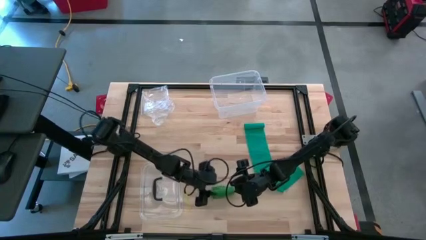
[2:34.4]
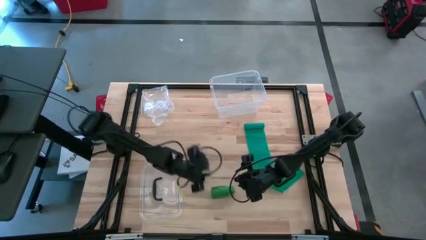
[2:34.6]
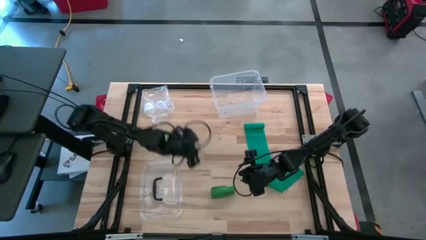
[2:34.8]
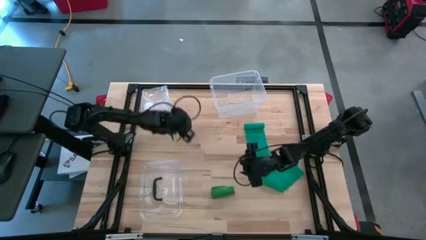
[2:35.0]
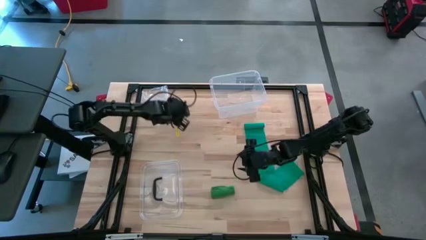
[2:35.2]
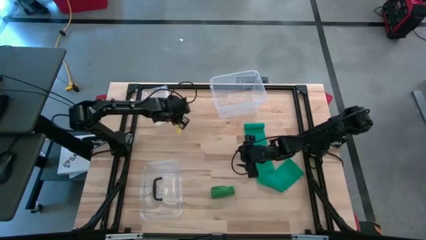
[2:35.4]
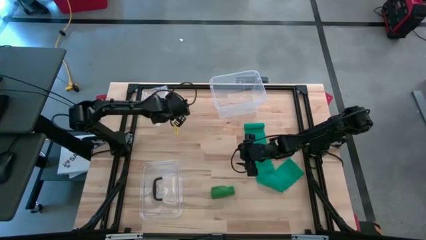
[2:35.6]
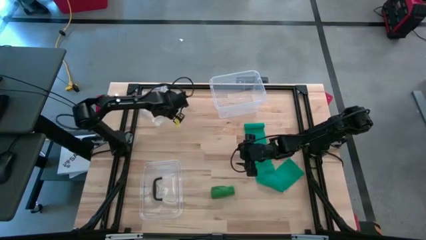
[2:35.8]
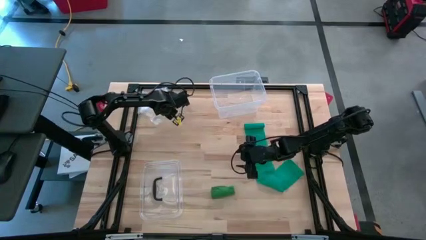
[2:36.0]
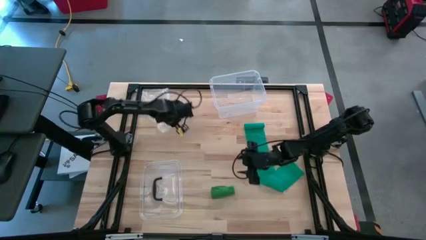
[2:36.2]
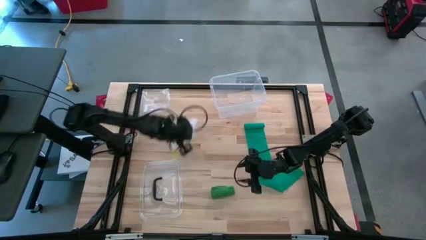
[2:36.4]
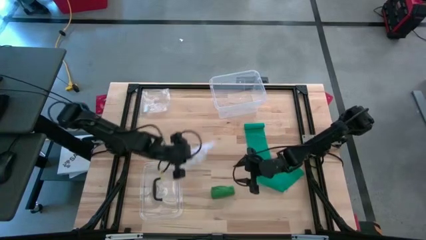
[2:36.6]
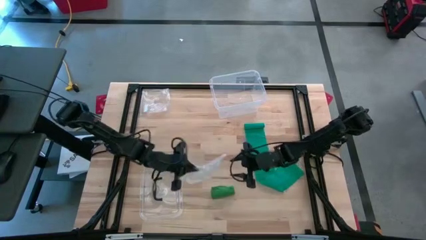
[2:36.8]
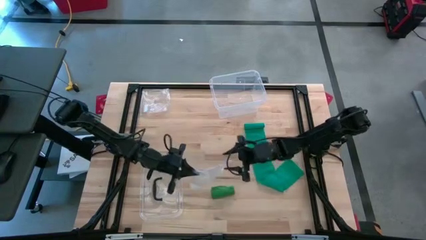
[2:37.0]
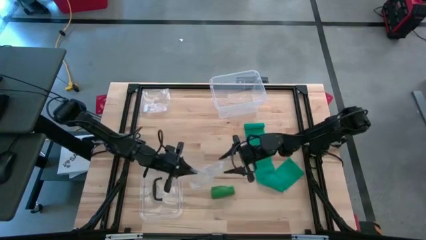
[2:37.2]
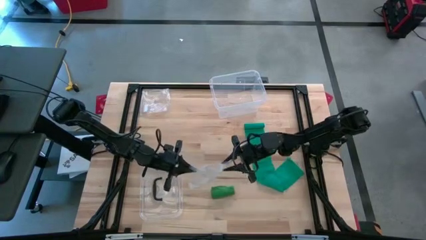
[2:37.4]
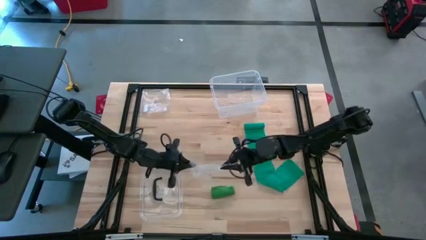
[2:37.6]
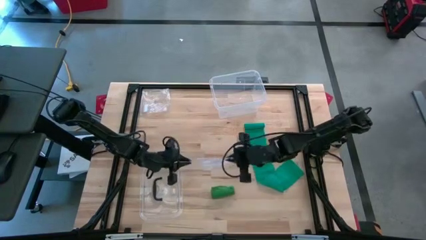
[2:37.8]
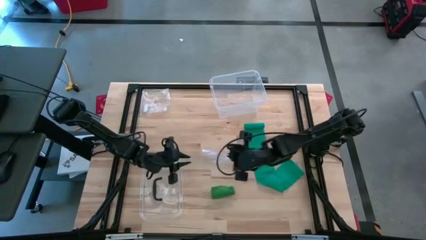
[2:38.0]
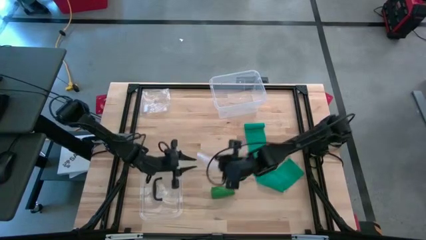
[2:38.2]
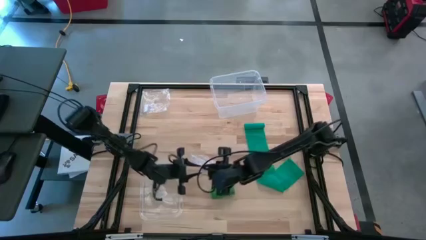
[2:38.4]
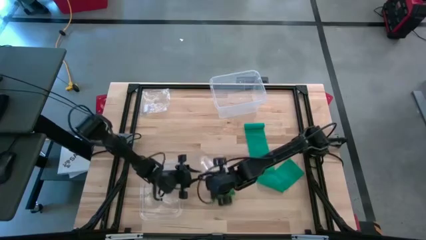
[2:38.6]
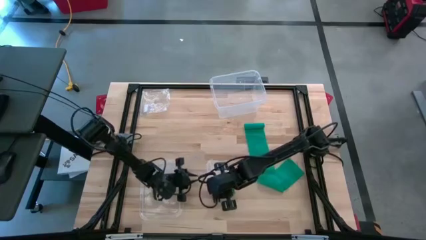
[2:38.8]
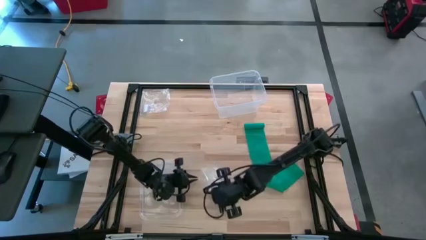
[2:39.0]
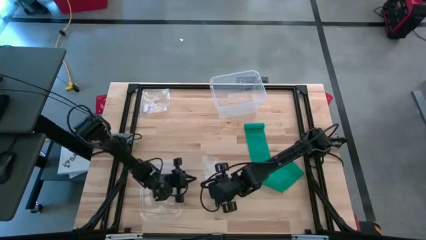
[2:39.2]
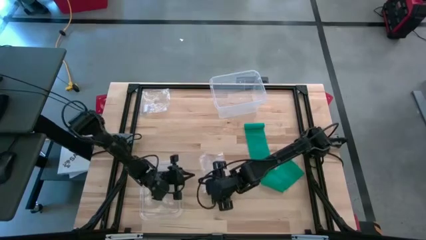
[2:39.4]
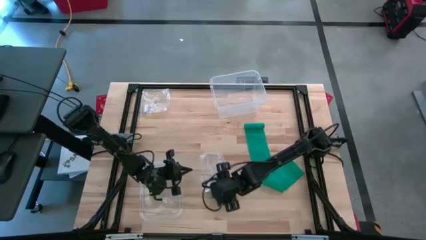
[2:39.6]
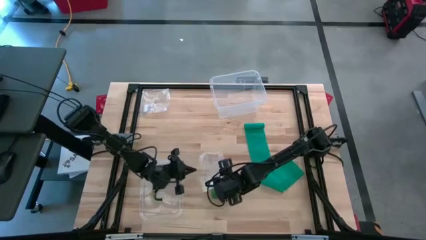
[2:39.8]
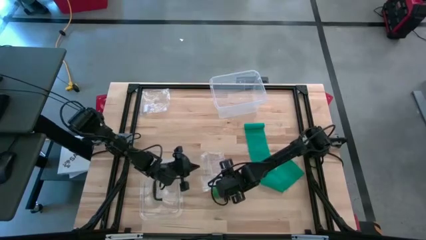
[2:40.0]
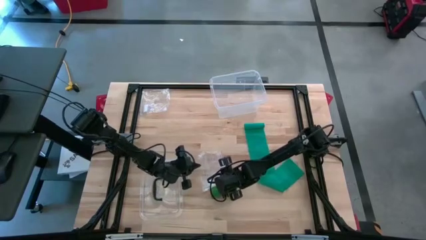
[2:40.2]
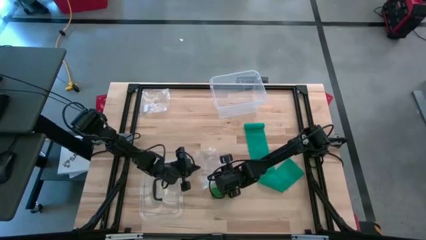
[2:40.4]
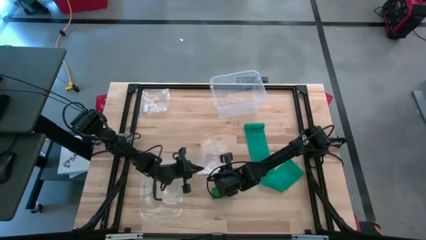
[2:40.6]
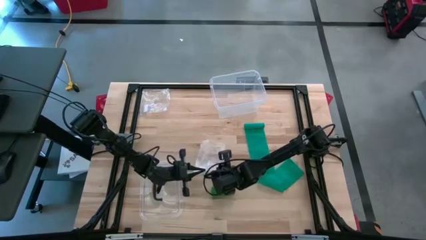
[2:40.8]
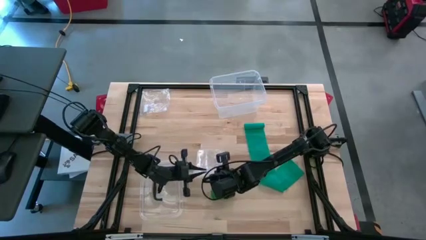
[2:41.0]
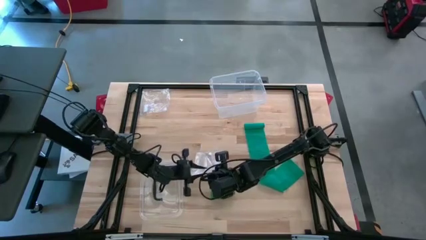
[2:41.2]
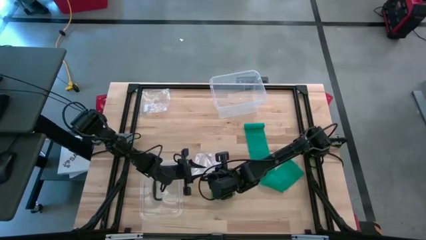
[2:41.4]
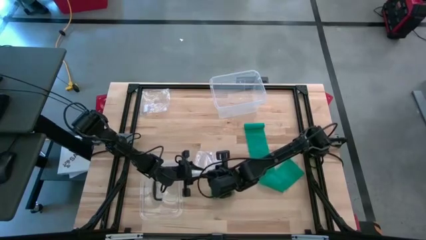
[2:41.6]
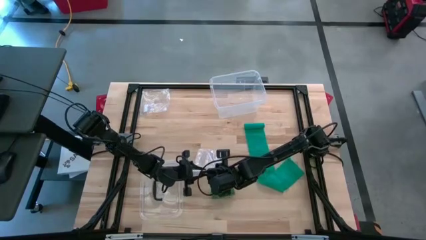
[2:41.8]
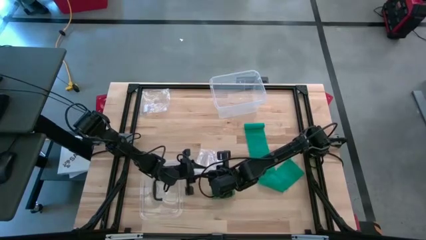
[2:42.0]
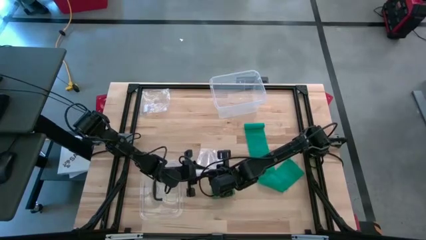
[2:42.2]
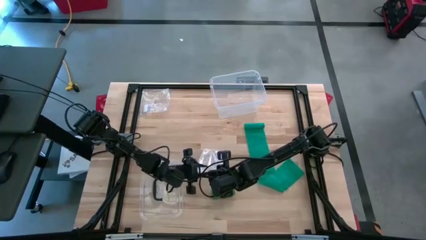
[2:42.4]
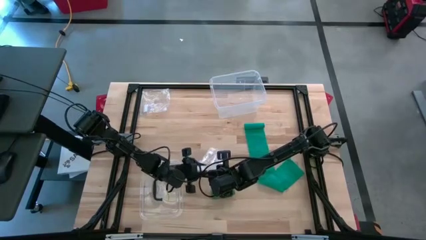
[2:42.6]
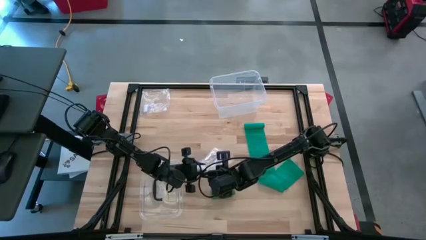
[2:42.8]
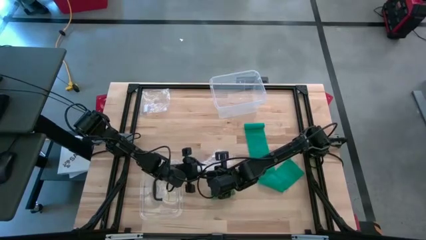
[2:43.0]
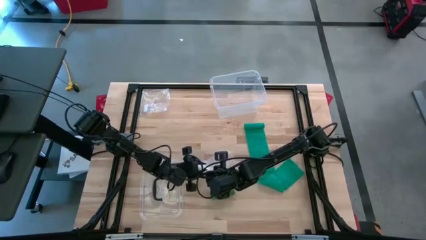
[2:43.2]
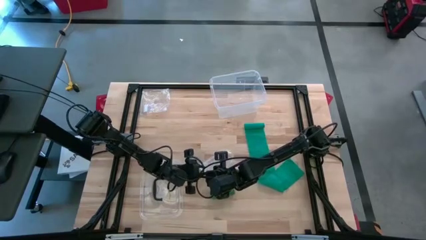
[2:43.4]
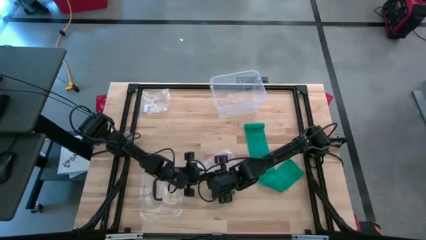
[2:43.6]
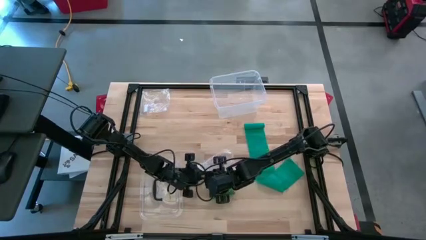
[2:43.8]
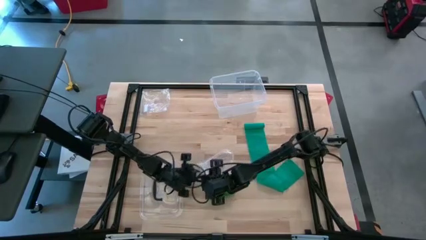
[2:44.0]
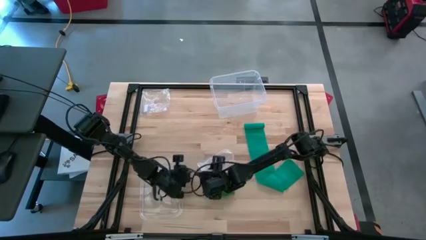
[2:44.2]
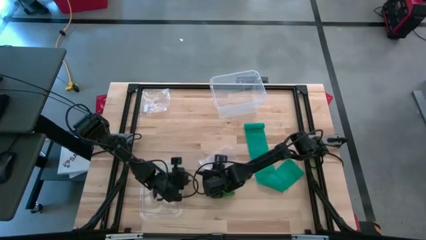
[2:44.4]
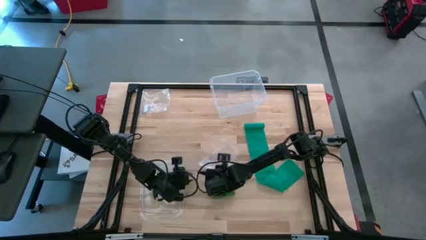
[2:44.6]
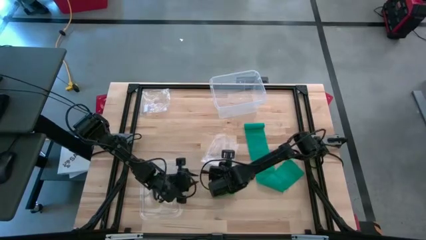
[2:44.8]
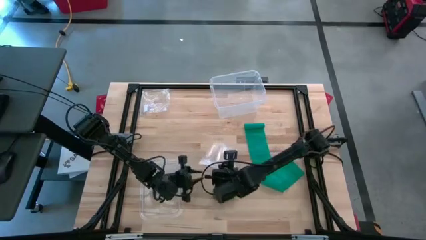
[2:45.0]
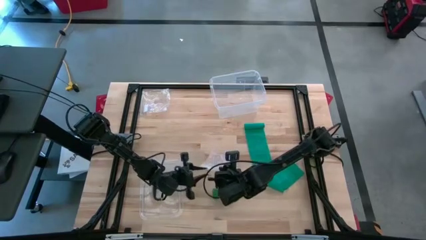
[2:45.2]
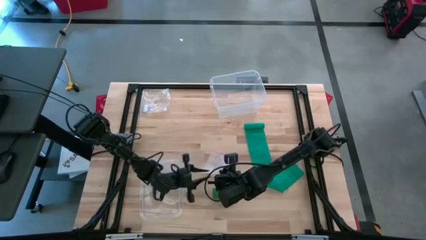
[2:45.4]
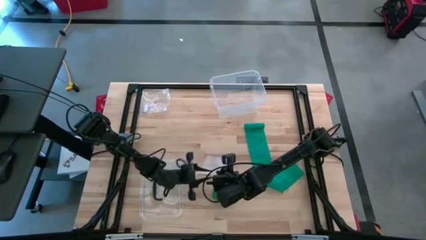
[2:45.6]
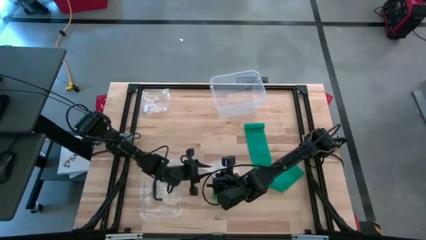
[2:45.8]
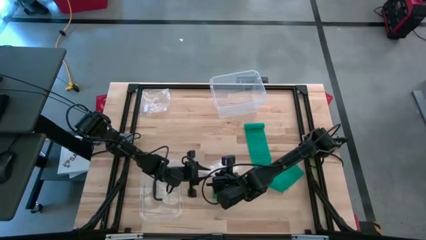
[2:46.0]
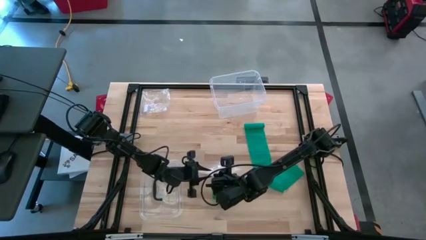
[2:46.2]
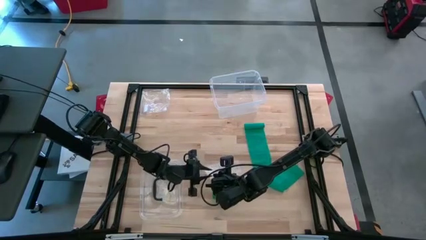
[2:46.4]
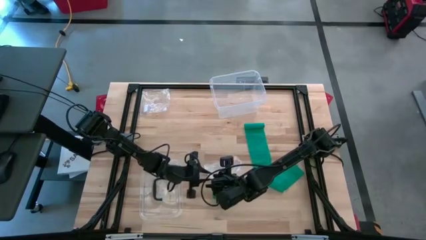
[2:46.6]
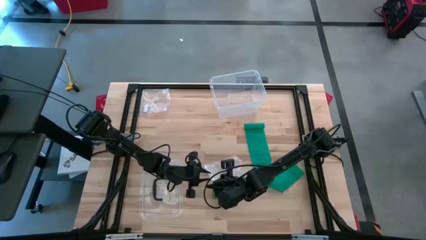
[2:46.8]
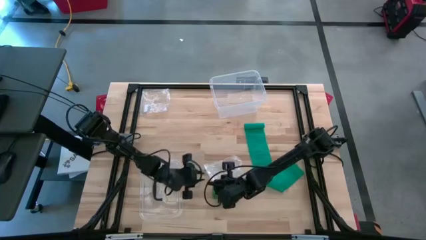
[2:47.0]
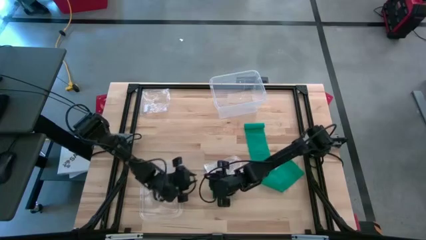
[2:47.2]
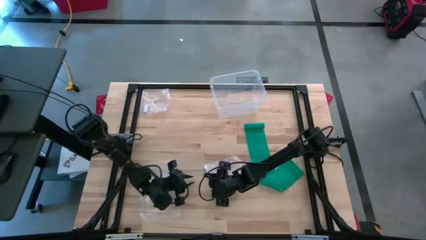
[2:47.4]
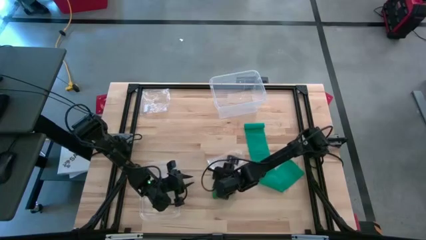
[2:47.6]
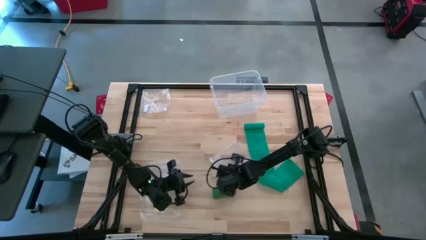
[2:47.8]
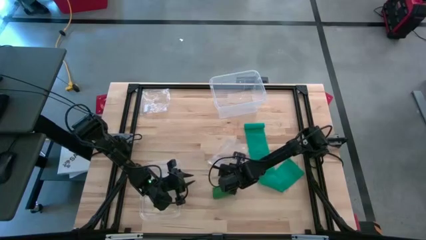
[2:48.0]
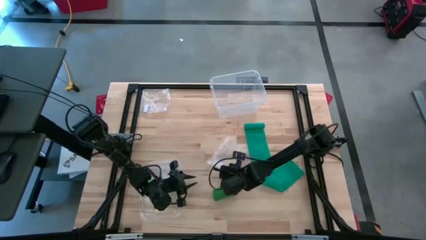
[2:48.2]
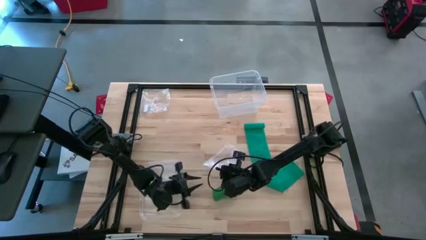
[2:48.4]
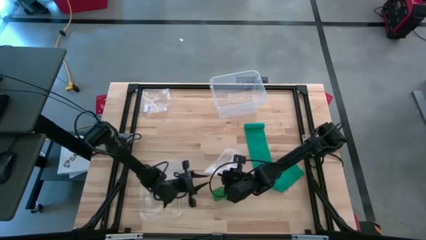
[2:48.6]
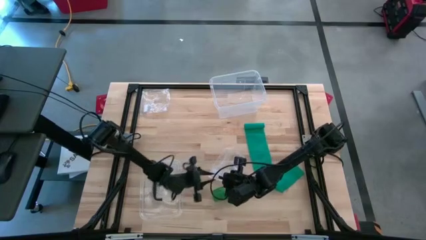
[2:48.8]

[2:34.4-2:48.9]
Task: Roll bandage
Open the transparent zip bag

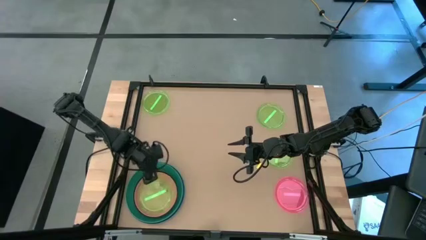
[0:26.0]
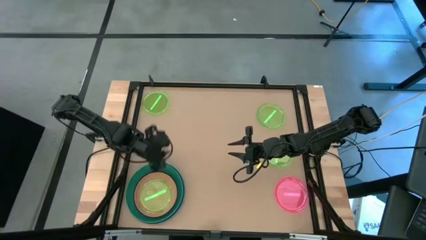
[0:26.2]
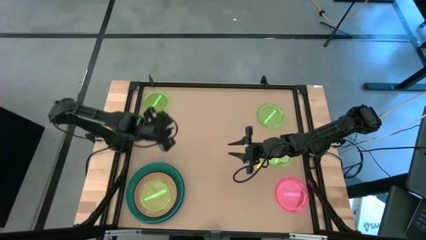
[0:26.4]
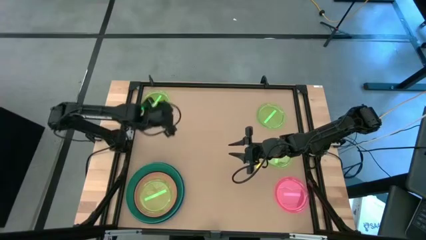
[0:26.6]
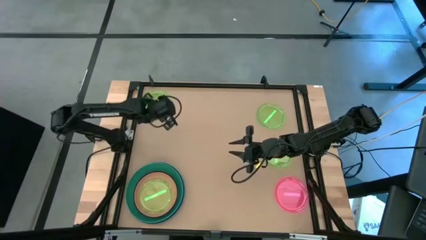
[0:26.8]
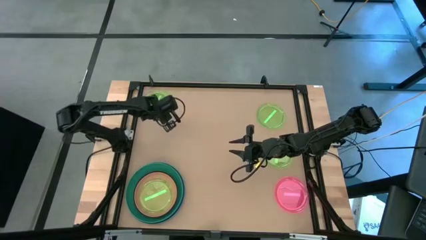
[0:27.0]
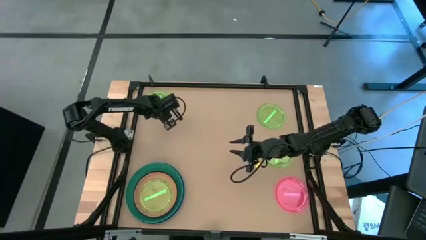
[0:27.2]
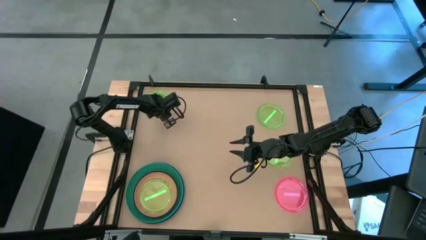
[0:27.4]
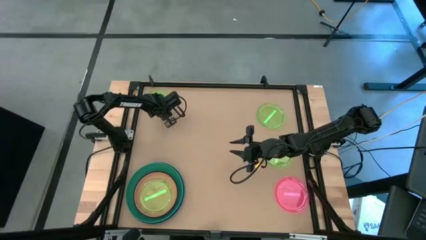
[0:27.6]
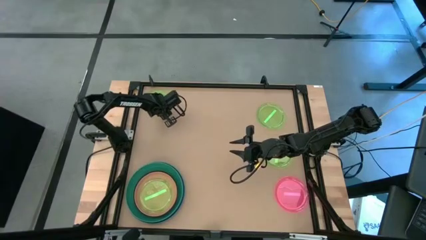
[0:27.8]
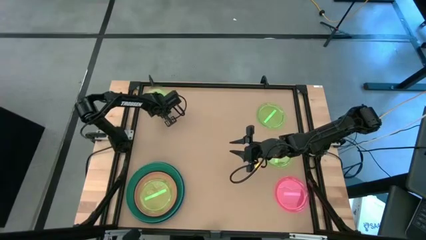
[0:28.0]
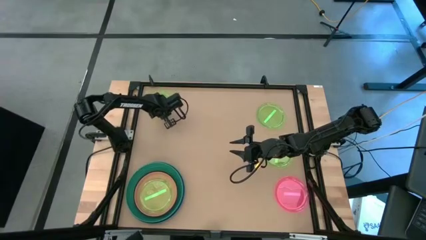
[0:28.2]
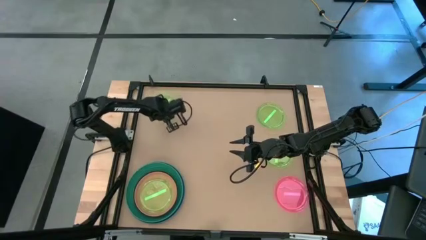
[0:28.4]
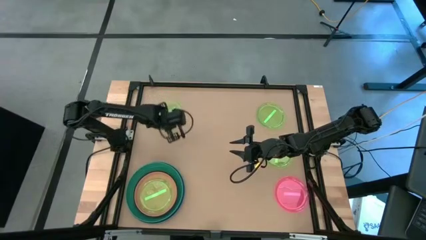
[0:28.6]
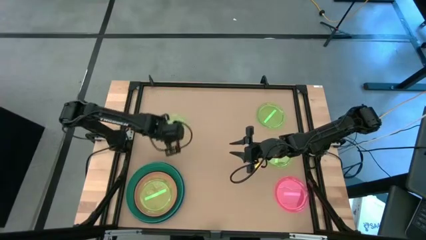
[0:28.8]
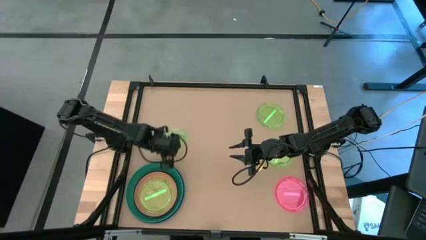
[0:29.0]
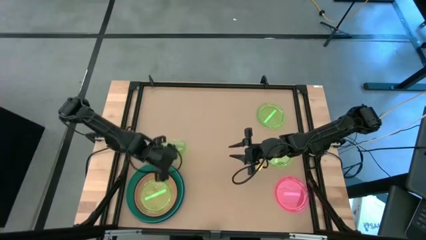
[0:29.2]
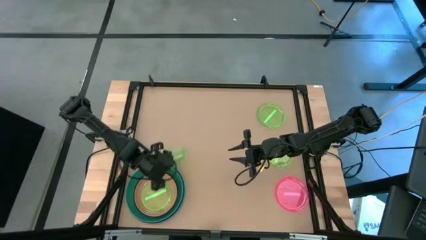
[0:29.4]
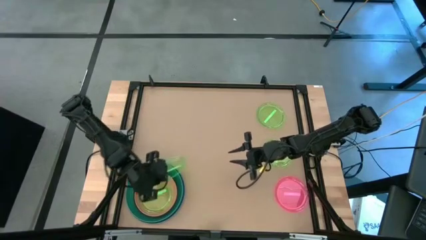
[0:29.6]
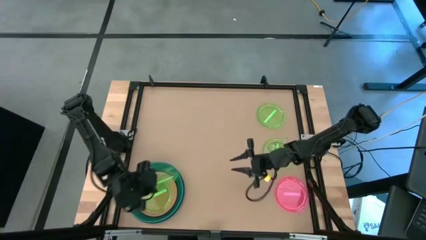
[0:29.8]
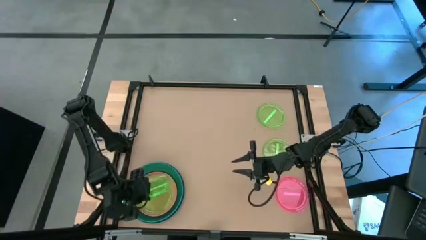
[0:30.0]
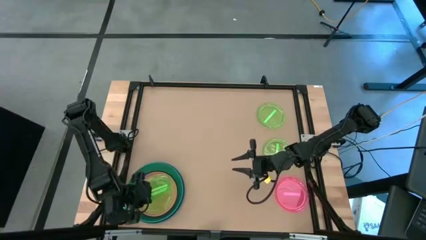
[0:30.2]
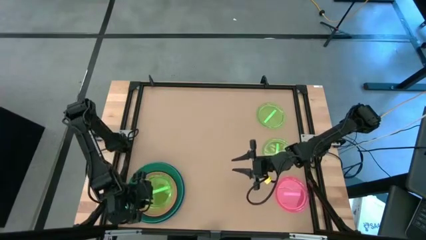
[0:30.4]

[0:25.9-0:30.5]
Task: Stack plastic plates
Stack the green plate on top of the green plate
